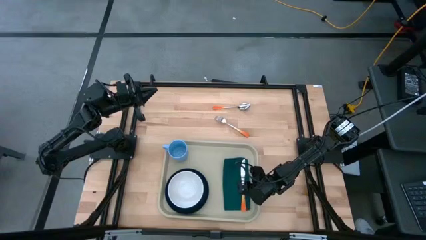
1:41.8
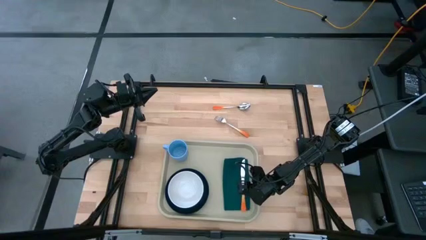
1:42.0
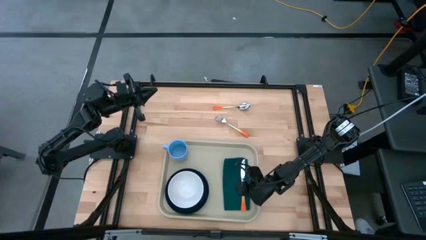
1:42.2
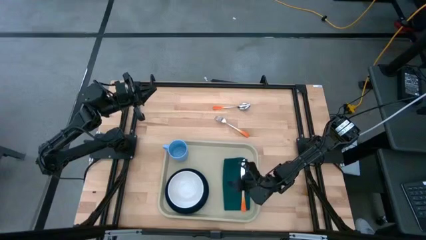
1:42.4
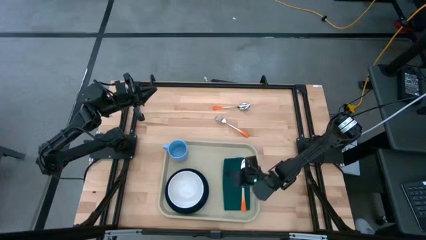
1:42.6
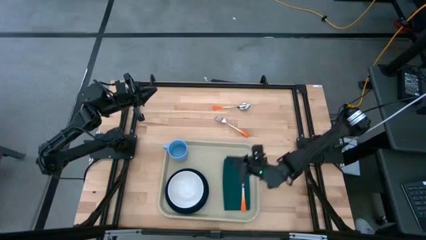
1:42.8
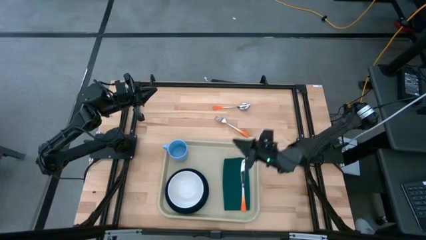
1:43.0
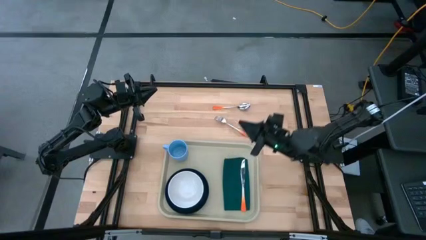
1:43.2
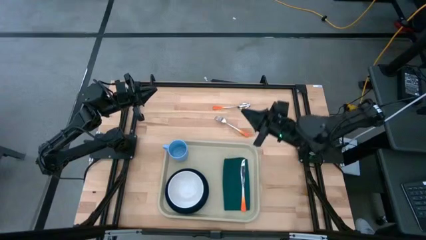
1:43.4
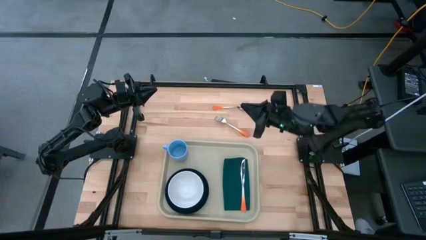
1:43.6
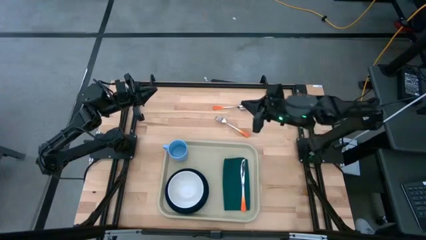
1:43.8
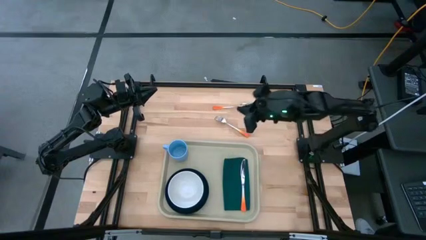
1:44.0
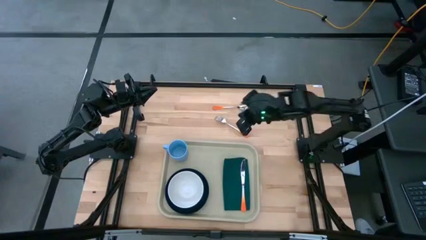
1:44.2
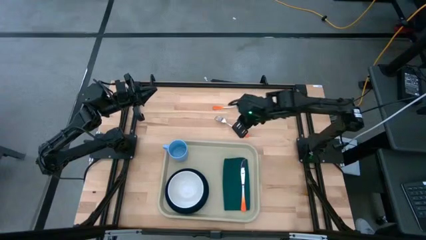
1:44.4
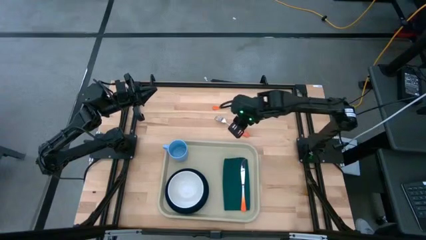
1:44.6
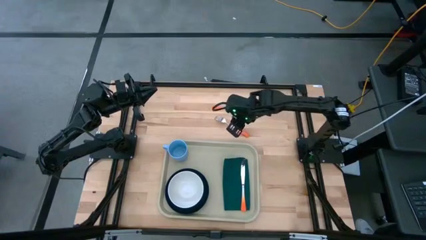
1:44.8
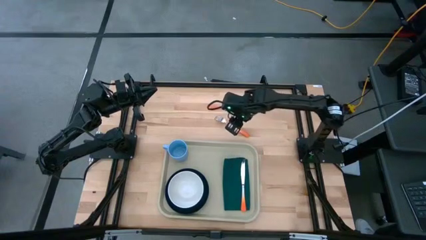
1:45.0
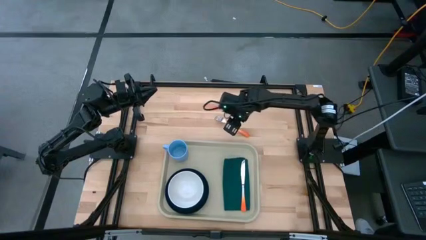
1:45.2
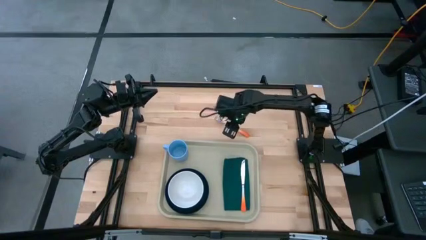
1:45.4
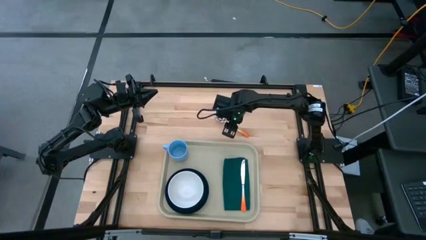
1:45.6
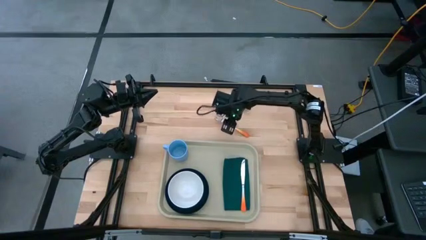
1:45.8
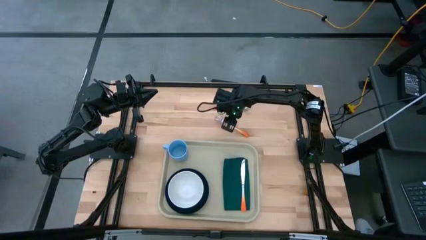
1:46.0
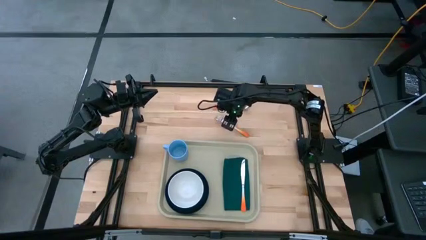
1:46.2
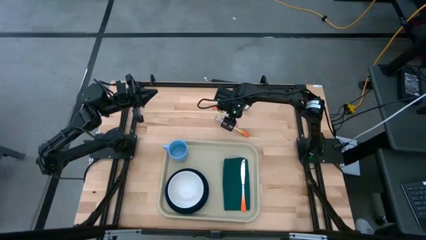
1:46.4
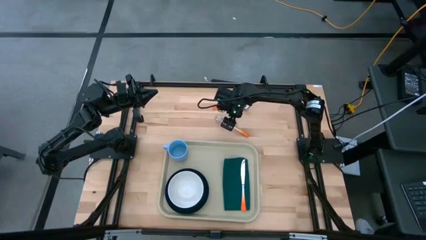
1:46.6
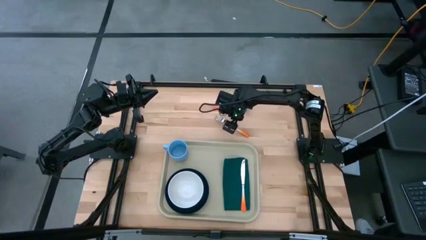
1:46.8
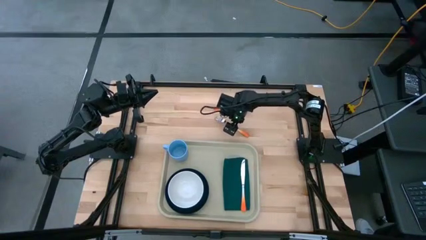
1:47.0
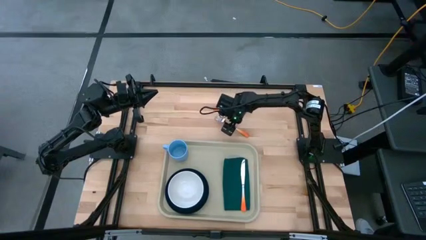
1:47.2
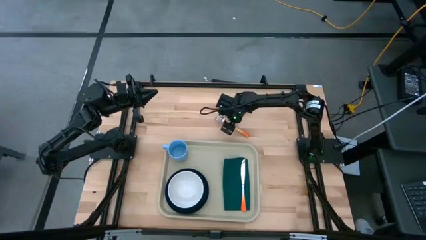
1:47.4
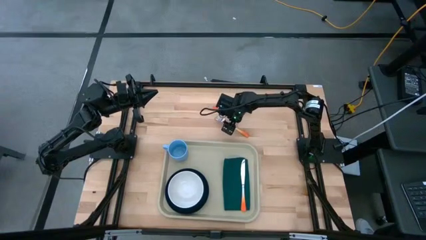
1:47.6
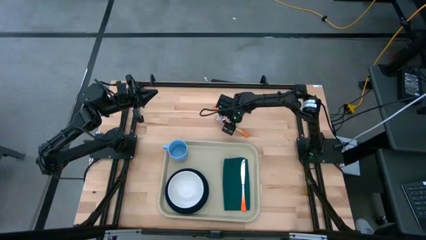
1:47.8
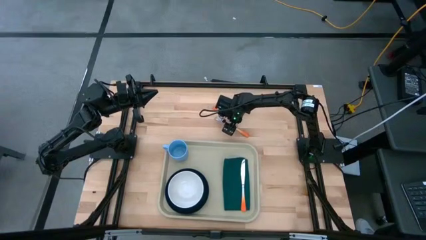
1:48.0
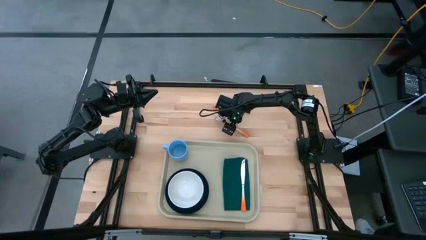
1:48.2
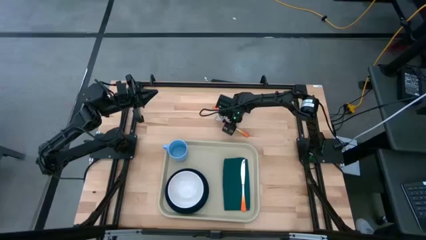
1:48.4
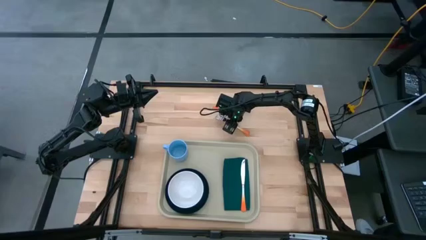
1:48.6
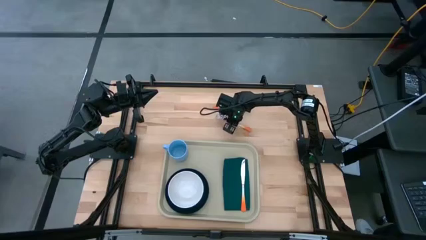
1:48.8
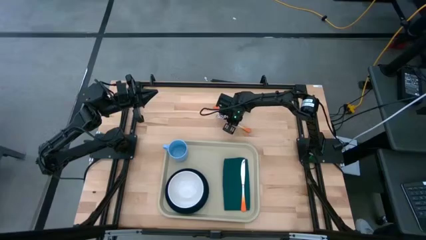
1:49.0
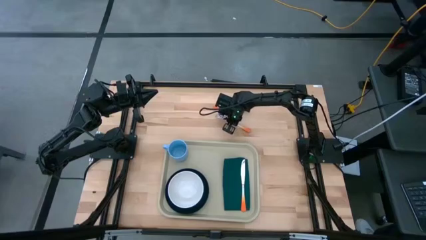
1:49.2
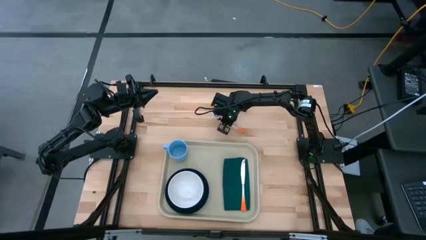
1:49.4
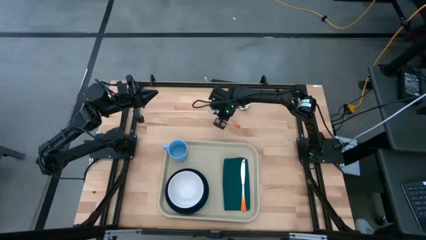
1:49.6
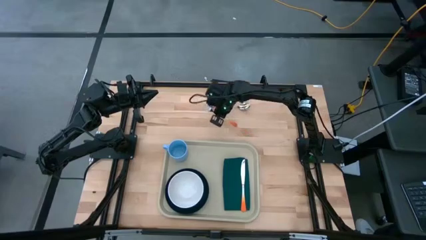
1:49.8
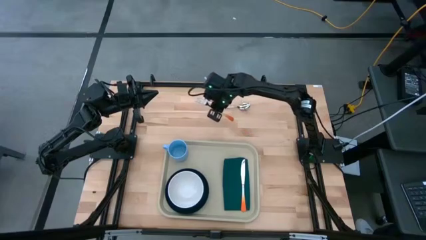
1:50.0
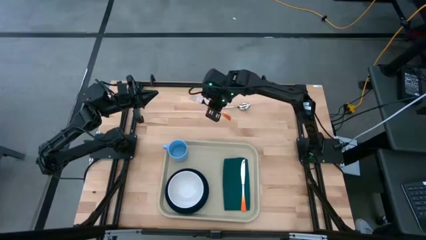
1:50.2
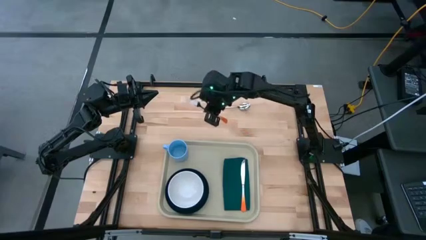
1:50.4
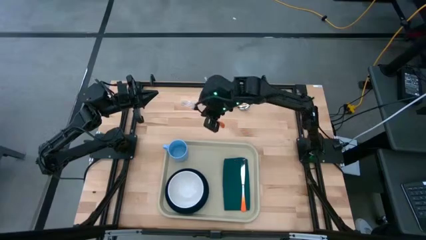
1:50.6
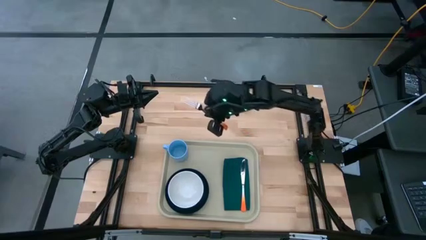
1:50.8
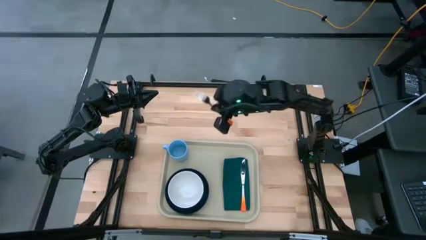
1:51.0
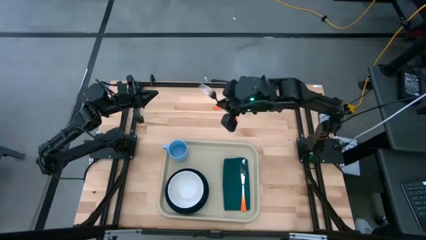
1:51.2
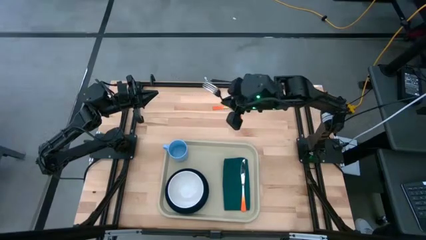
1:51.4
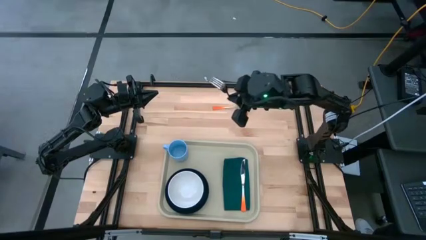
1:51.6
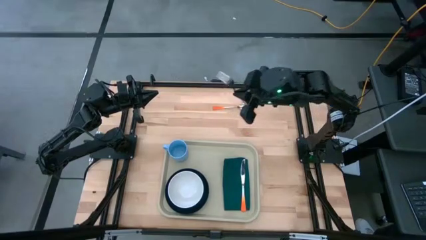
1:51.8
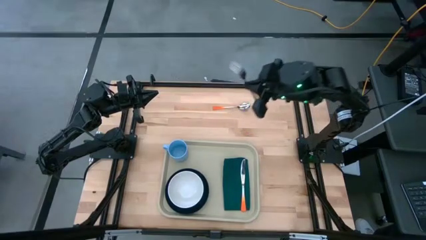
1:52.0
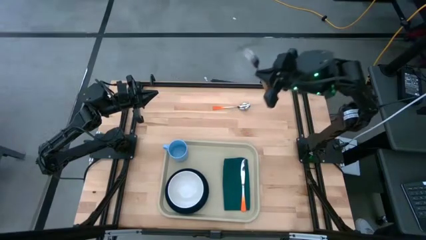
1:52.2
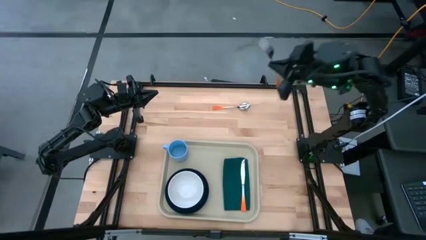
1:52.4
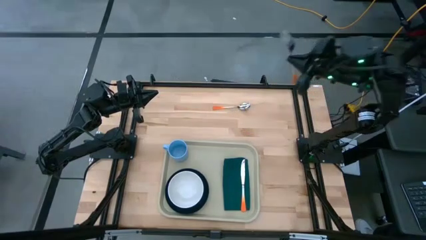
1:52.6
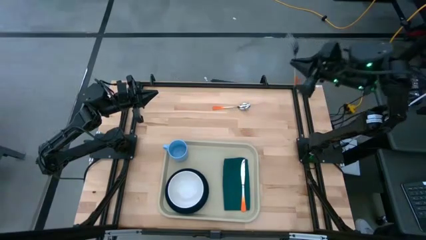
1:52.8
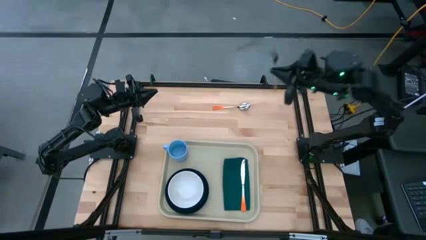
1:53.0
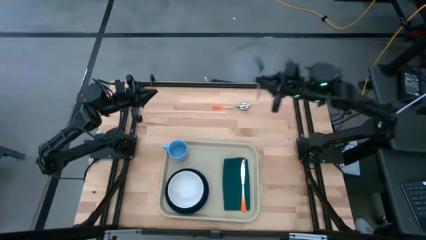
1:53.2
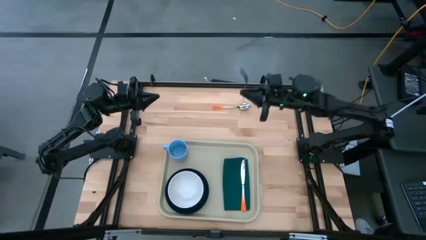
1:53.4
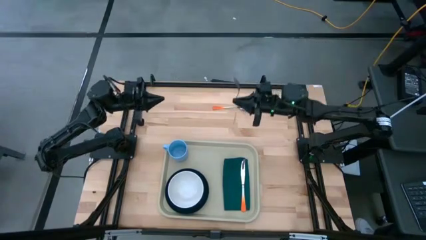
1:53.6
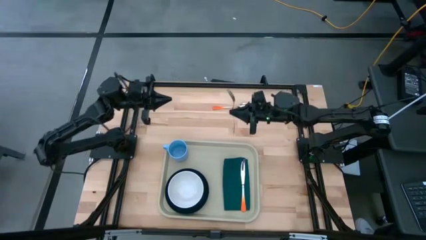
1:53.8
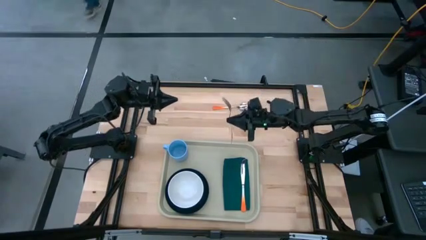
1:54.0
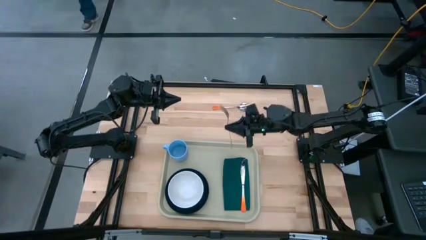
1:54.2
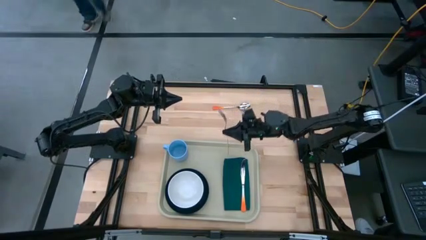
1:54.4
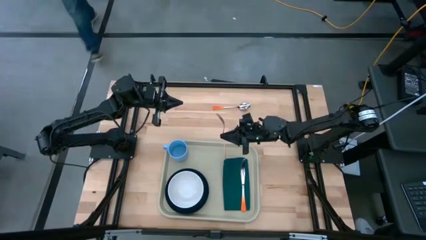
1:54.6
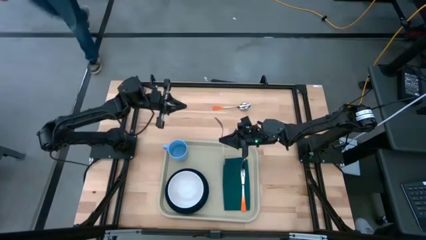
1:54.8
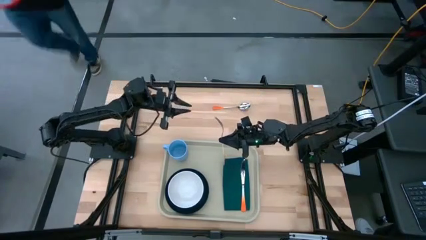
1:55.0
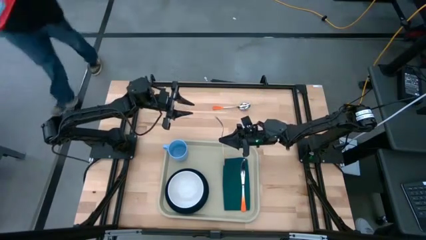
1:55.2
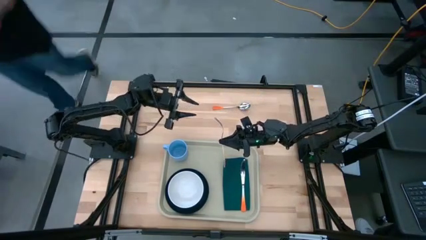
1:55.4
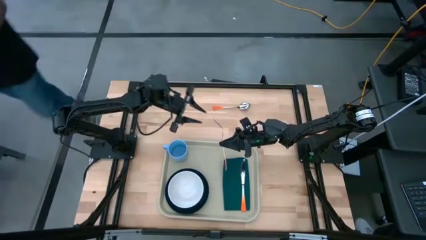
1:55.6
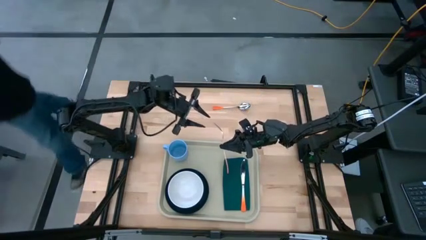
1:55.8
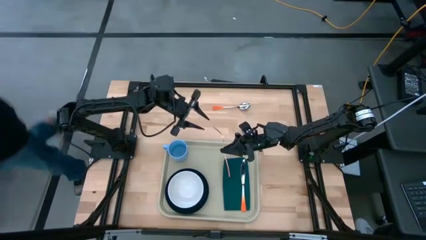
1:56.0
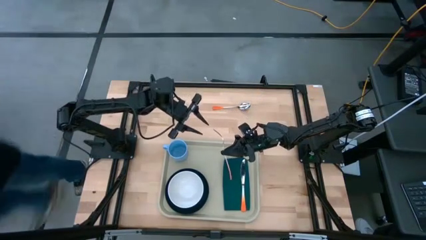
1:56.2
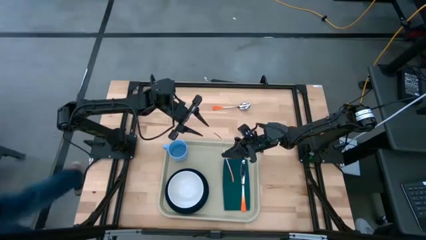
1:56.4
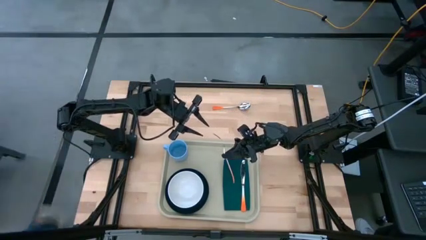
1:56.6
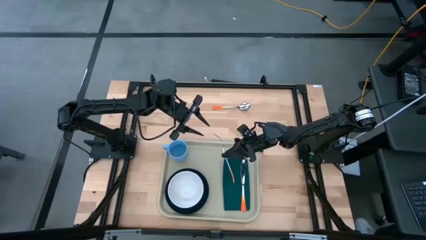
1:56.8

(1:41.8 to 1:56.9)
Task: Set up tray
Put the orange fork on top of the napkin to the left of the orange knife
